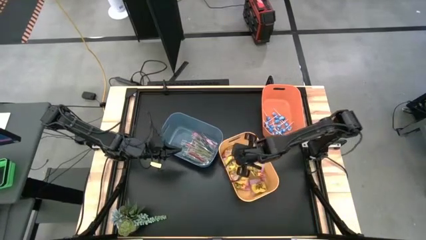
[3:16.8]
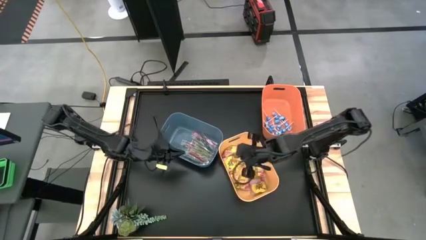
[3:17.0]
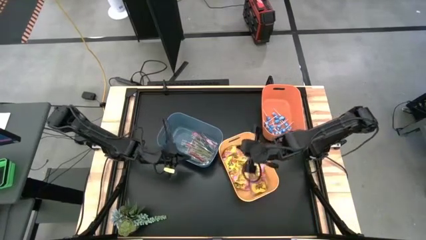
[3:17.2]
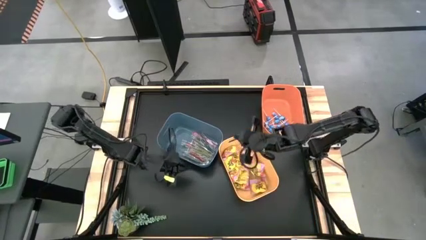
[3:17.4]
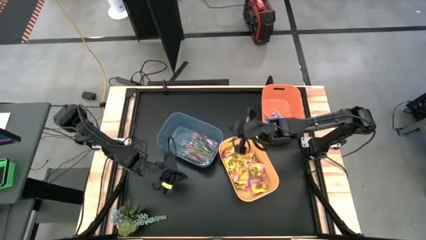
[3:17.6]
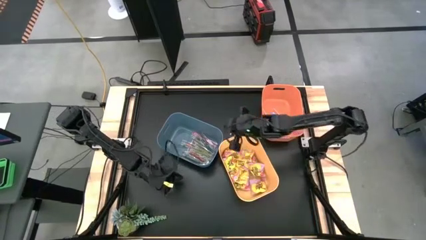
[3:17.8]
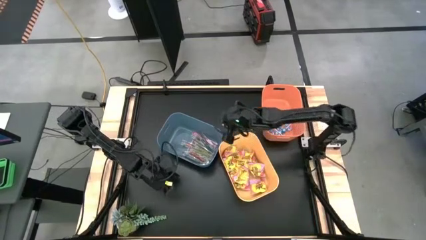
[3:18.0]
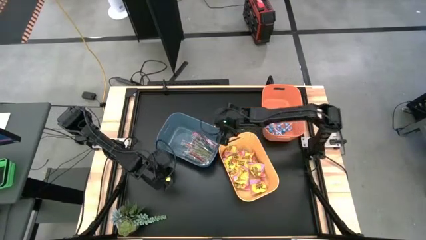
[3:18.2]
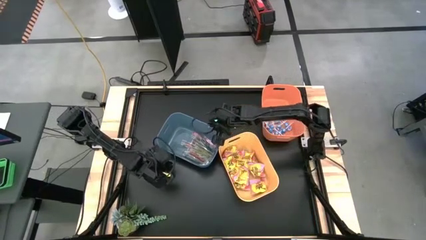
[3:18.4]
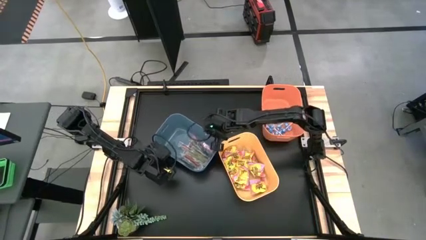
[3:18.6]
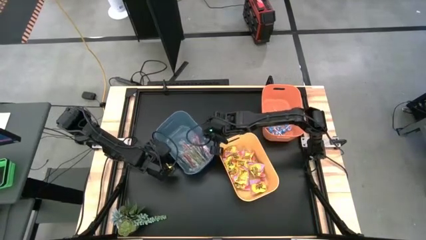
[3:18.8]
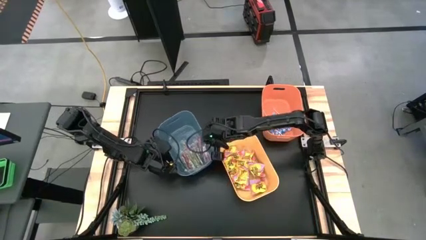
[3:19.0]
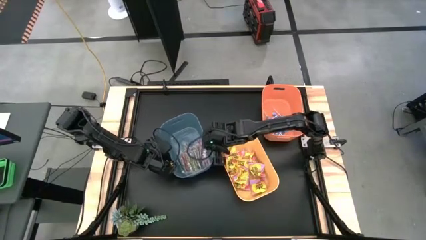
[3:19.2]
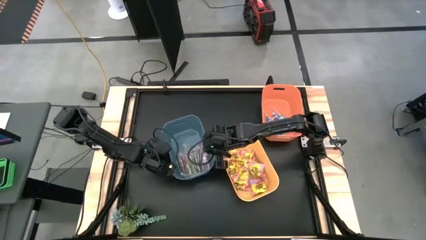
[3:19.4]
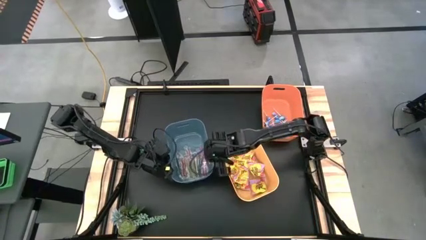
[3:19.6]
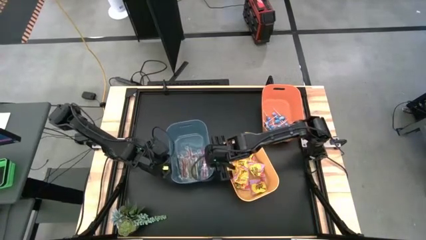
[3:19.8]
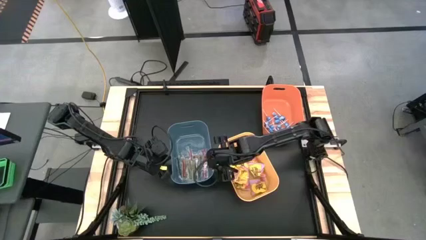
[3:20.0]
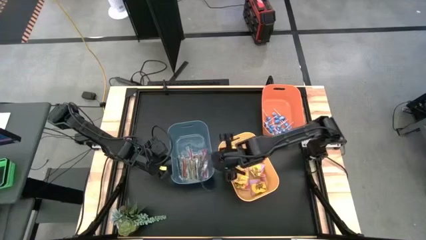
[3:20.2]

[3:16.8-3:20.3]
Task: Sort candy
Move the blue bin to the center of the table

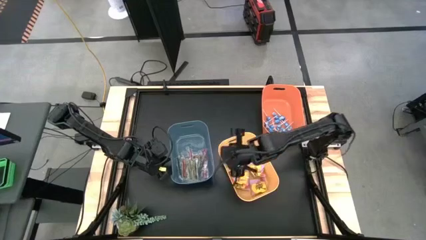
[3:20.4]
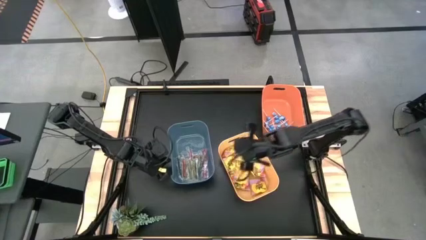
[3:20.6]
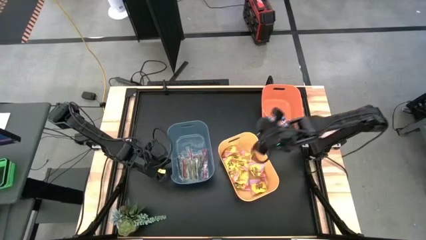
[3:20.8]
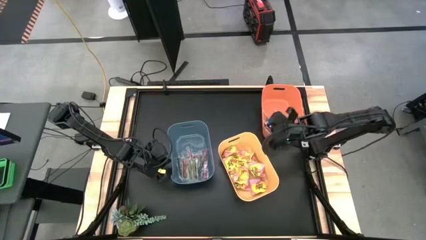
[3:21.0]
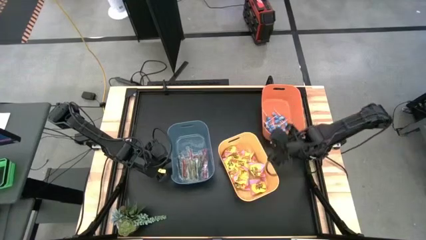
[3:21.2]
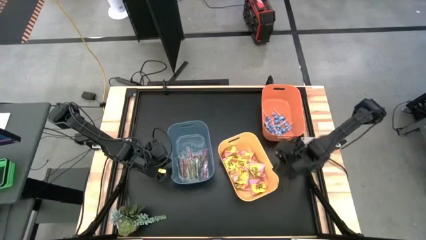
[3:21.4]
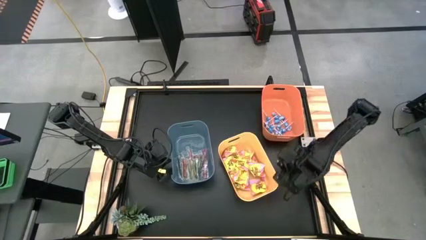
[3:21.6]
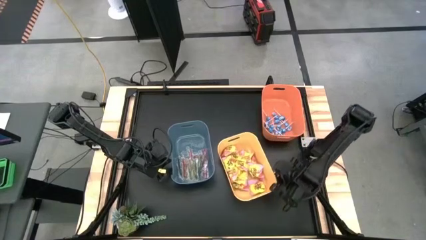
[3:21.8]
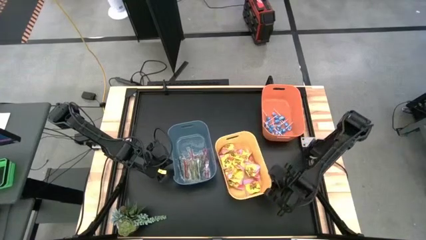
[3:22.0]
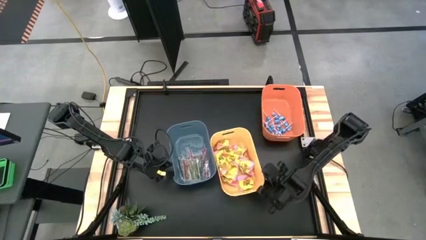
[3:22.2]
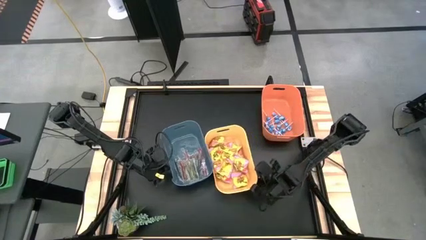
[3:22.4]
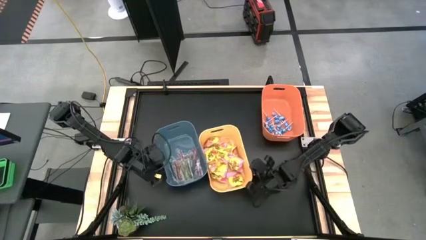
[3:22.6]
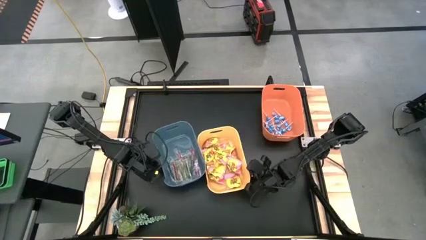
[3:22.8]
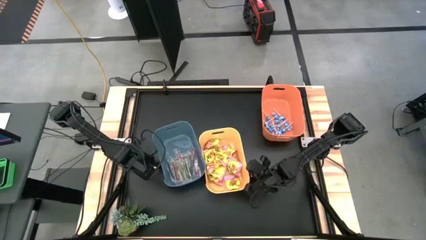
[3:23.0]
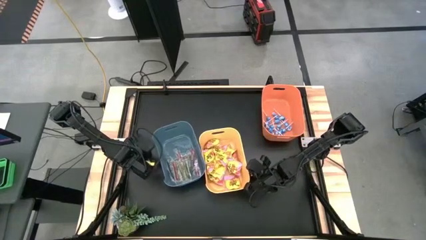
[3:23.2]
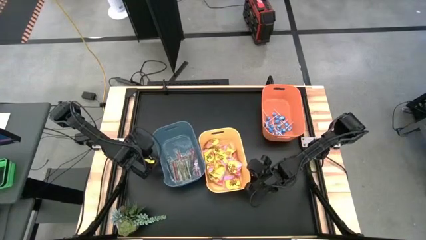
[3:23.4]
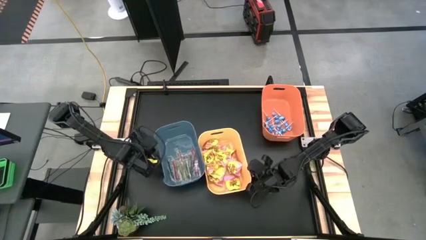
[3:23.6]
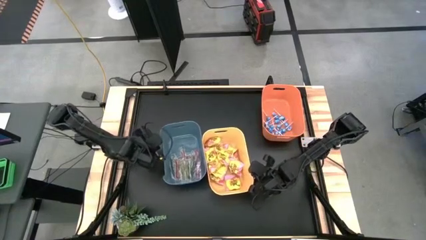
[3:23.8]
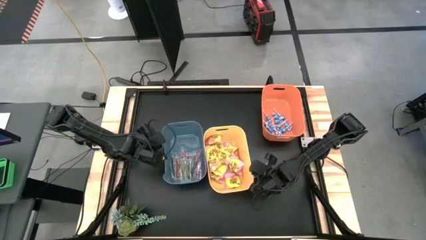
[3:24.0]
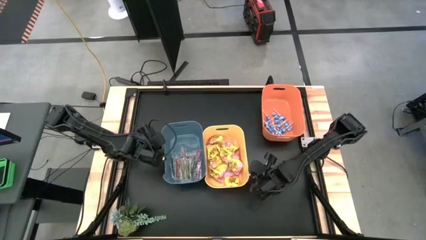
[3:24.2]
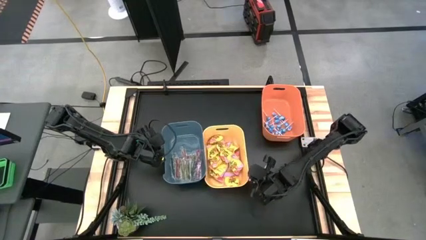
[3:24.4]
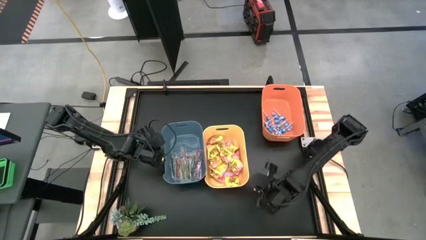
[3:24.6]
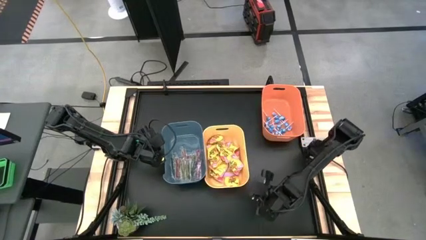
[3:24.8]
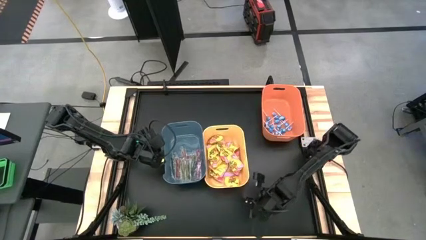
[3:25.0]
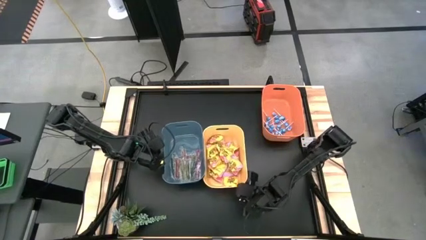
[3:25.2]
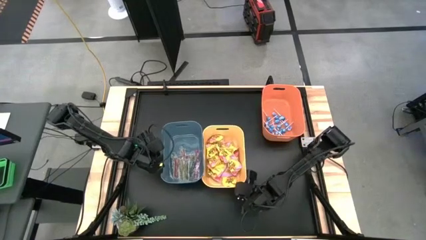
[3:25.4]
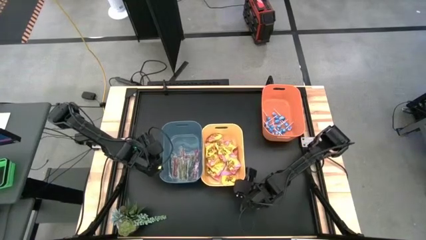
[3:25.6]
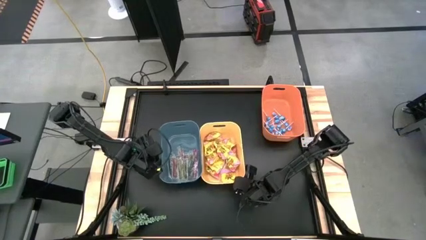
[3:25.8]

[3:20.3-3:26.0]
Adjust the bins on the table

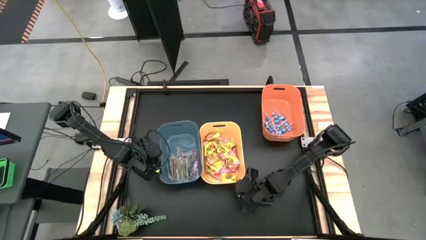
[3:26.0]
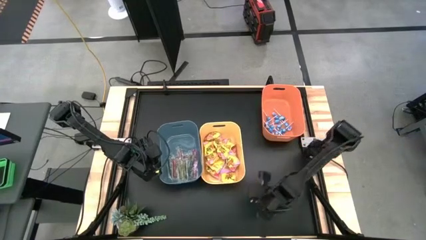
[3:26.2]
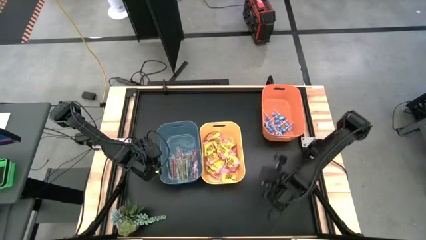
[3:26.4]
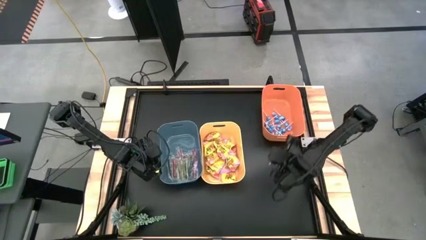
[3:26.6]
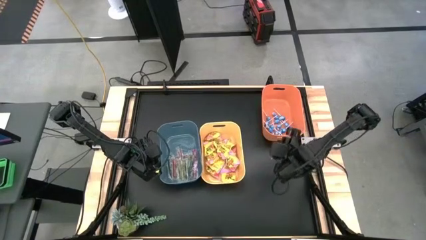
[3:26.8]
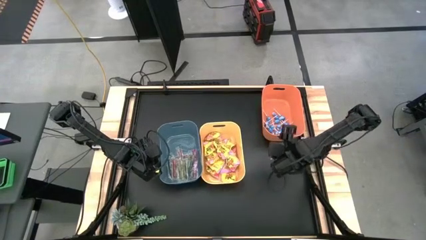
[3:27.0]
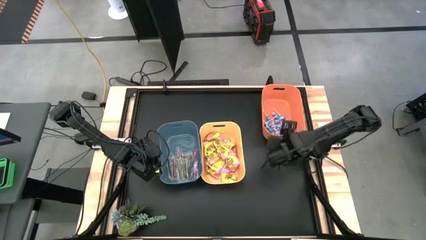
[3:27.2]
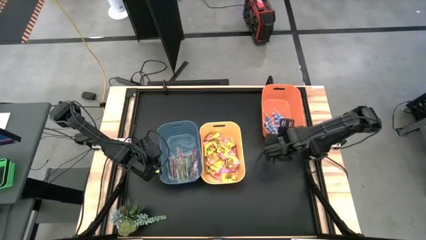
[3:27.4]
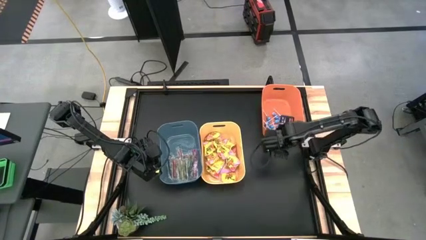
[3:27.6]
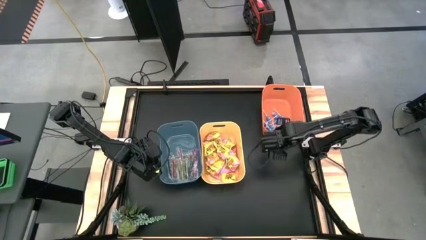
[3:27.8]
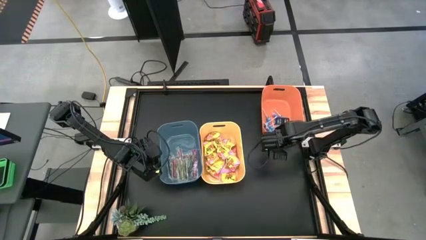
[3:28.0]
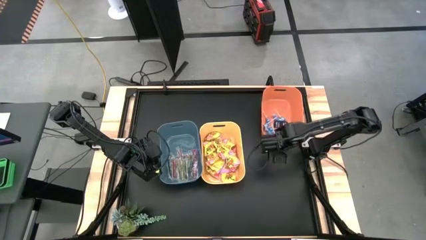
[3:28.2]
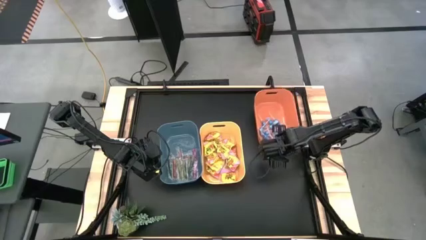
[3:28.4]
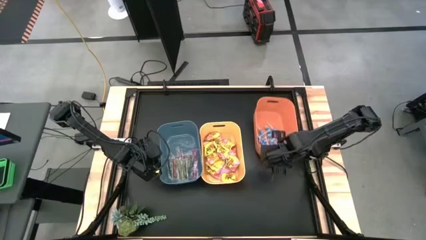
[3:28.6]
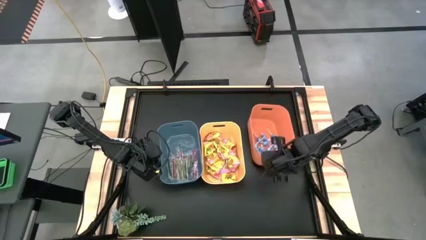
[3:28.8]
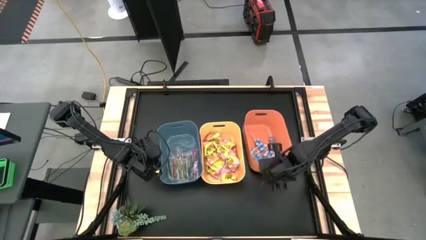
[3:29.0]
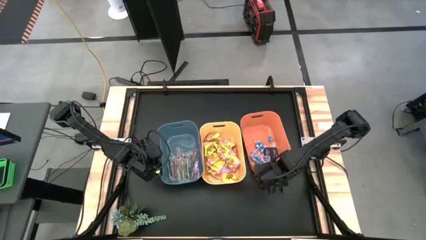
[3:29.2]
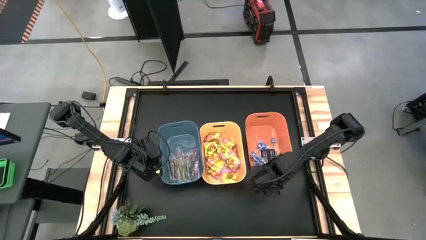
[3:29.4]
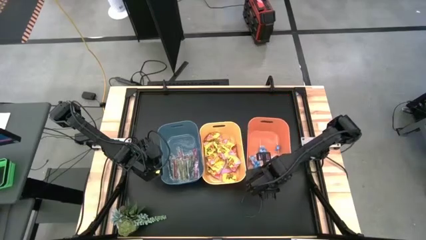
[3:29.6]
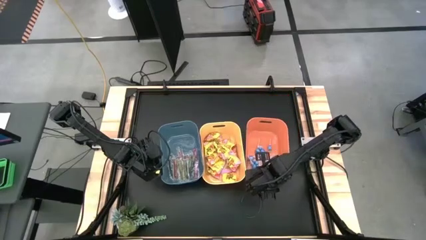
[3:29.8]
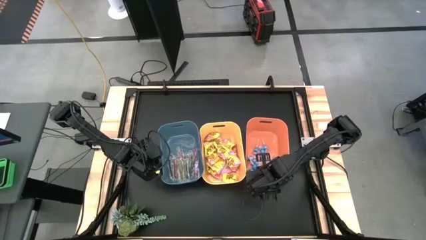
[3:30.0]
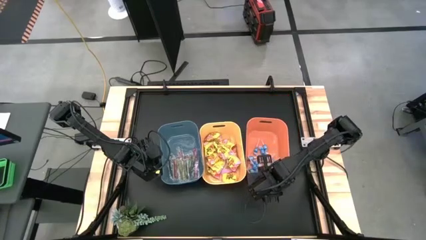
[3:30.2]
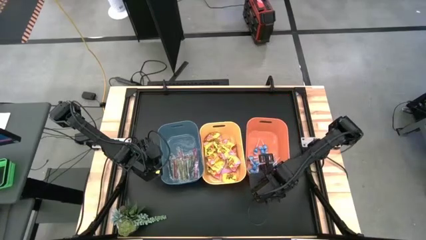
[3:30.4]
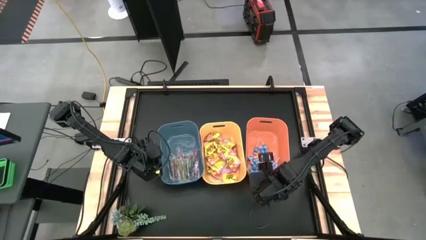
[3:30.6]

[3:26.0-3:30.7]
Move the orange bin to the center of the table
